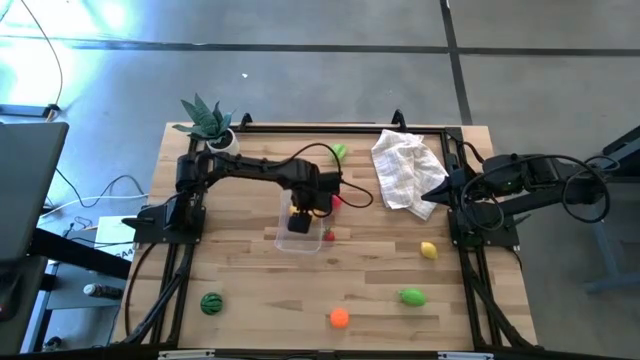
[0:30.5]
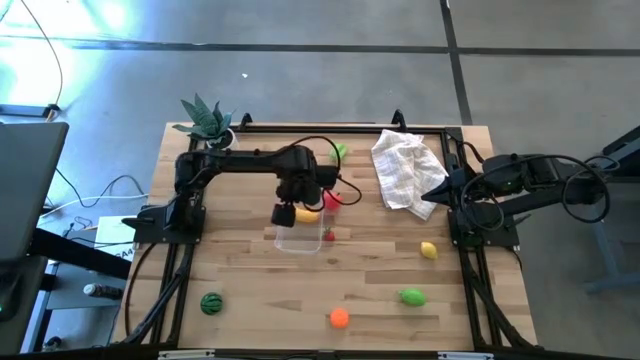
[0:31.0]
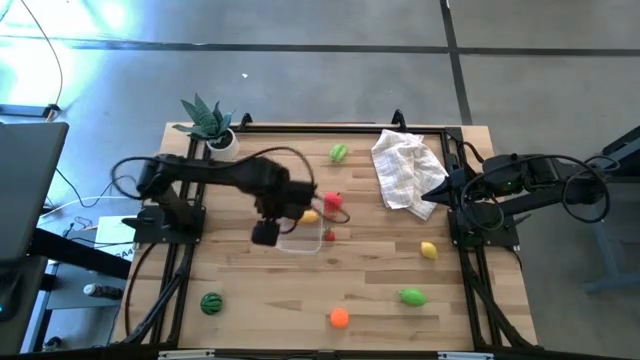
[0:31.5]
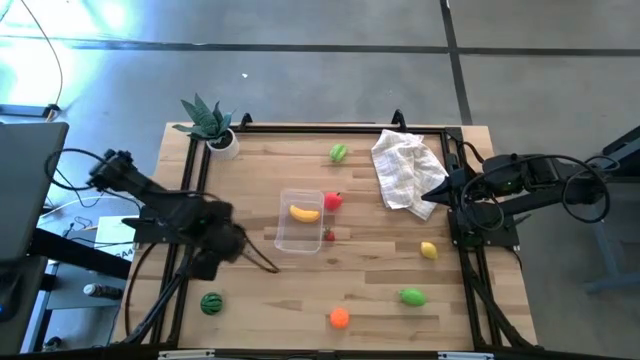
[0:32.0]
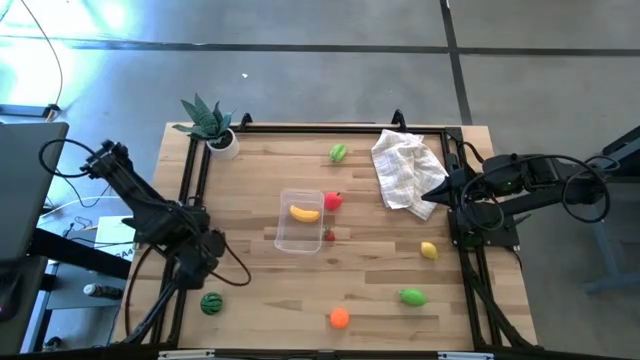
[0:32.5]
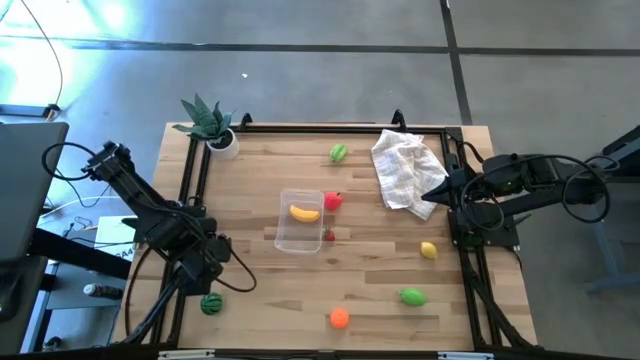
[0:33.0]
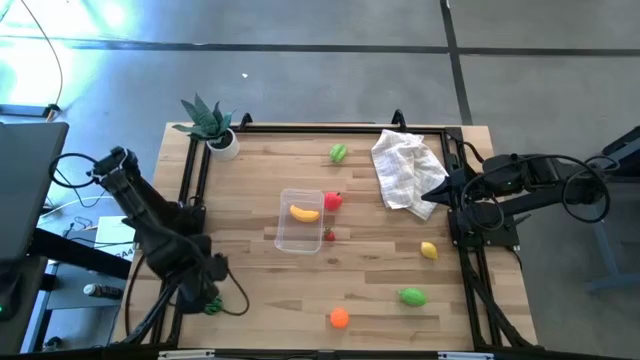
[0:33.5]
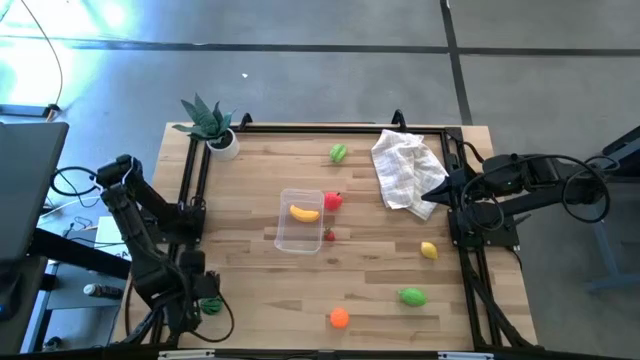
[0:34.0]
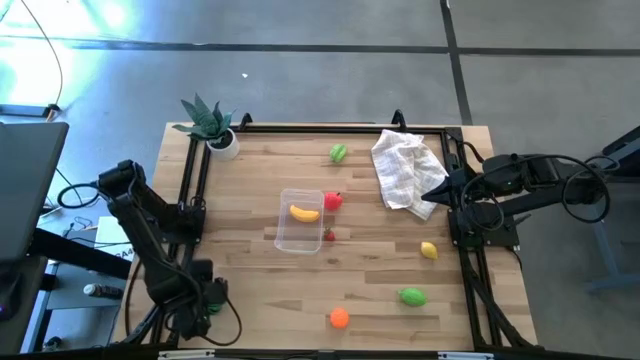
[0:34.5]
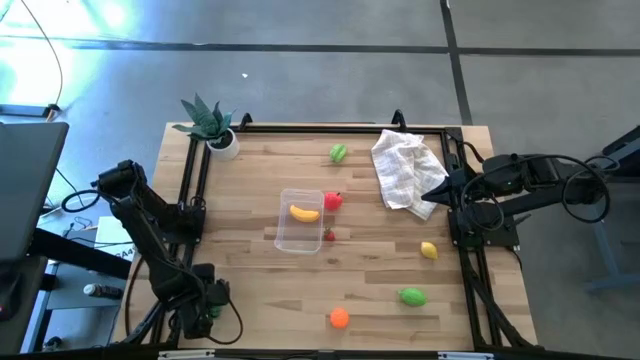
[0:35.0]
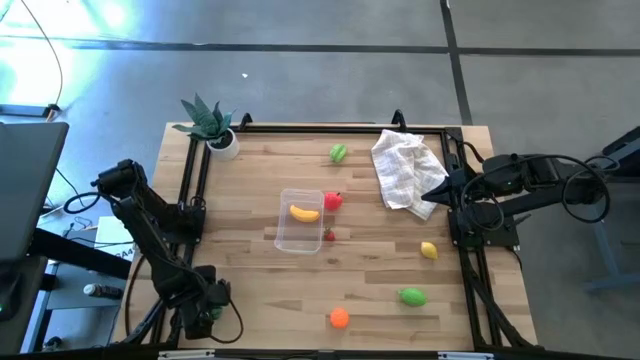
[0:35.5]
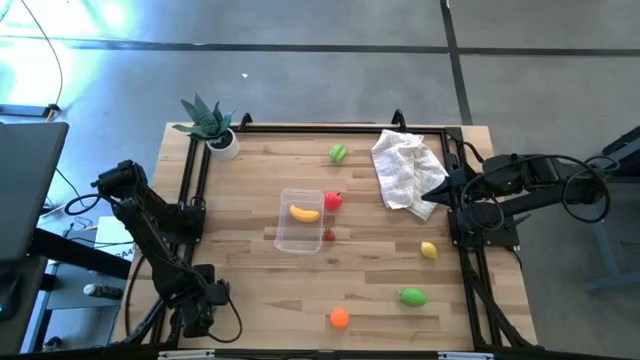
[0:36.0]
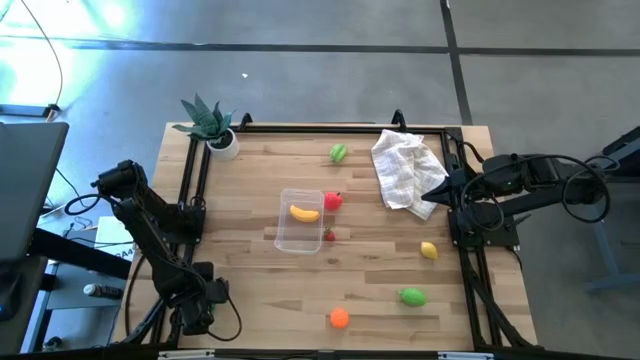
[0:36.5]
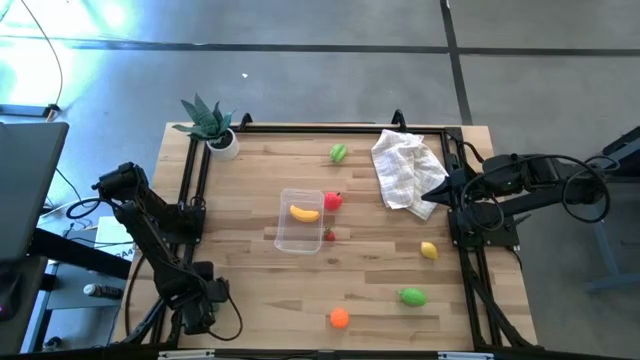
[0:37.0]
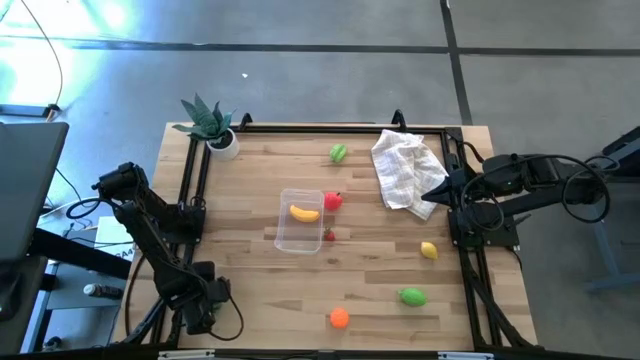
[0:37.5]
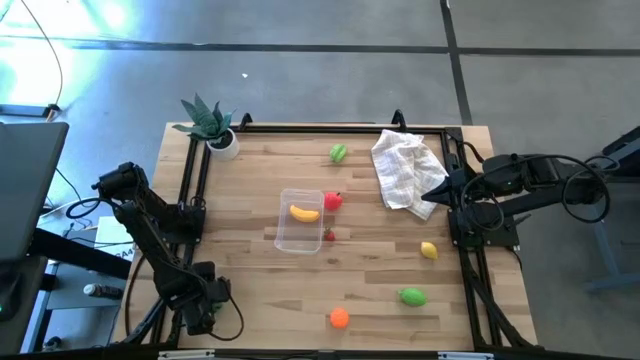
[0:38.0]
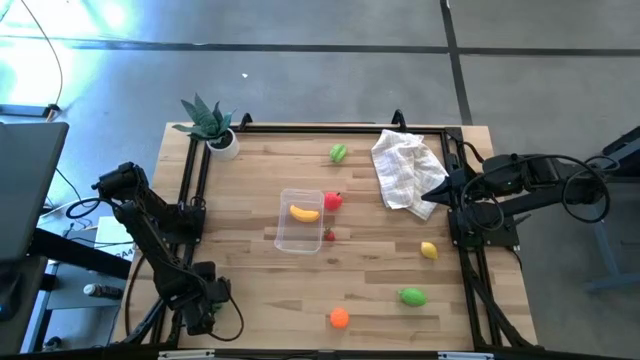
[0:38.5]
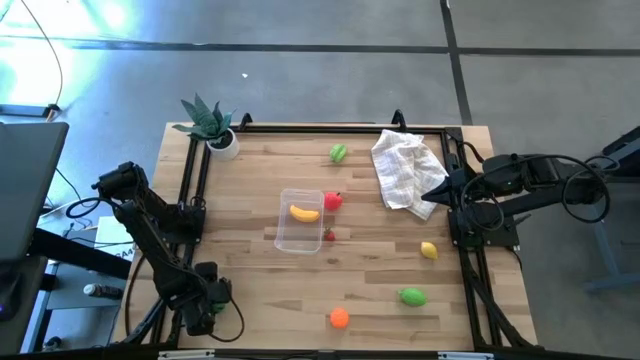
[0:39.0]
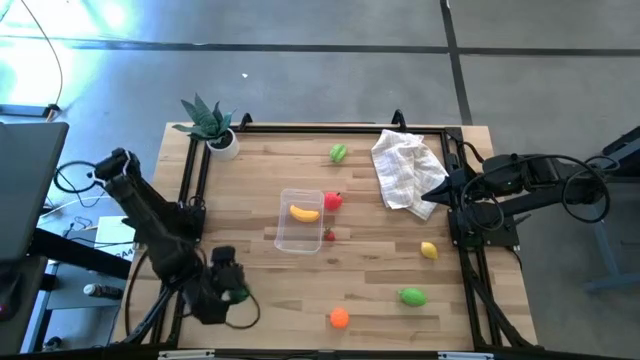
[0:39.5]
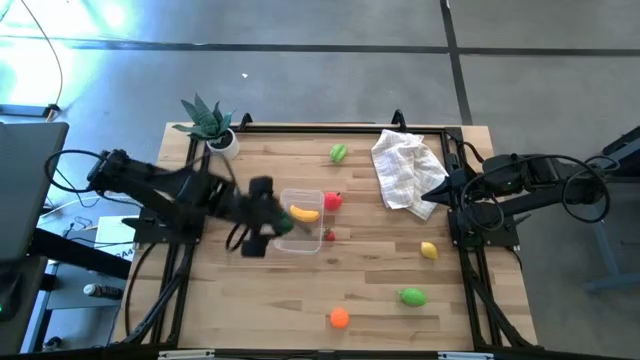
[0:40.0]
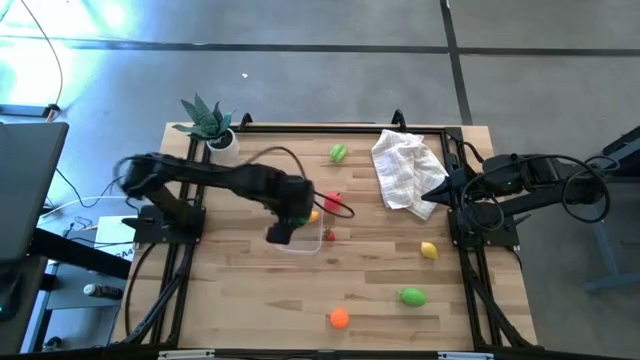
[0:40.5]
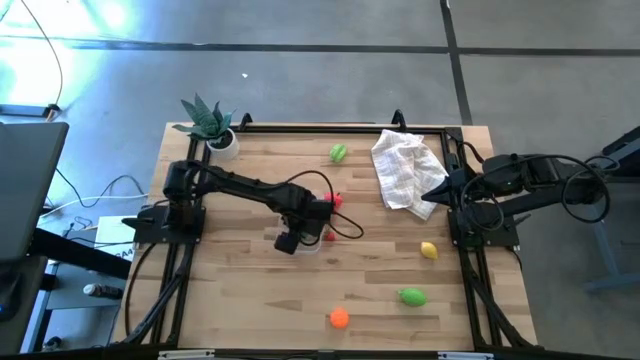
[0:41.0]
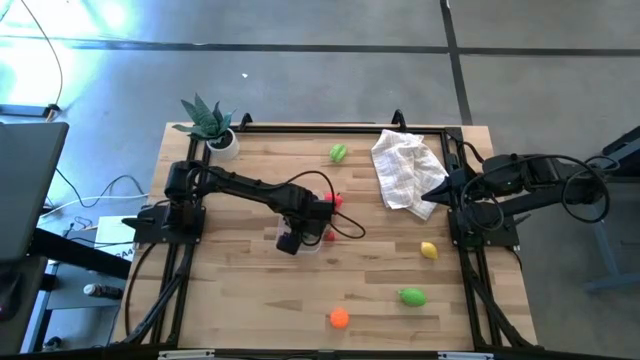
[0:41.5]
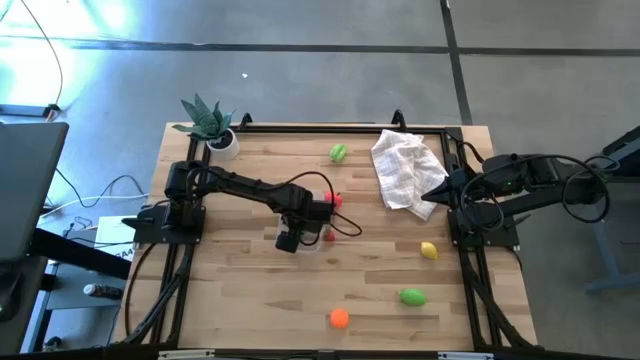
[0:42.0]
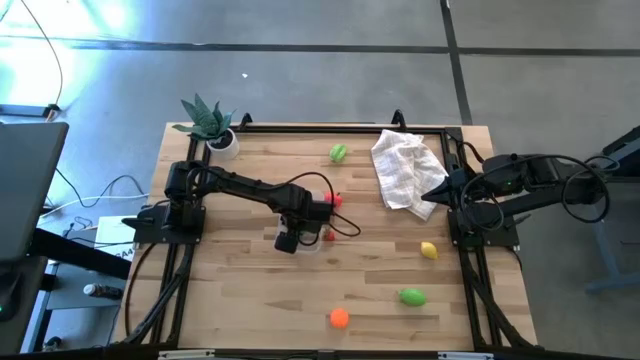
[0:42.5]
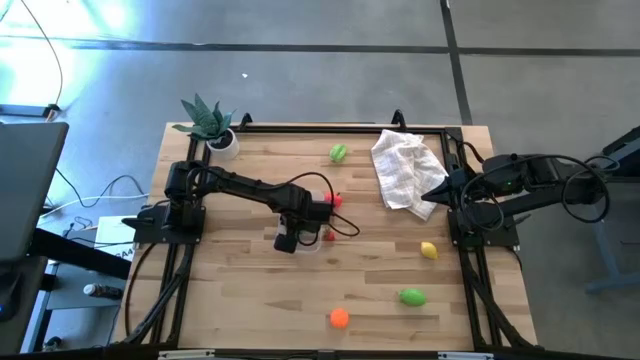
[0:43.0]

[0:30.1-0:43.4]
Task: Pick and placing Produce into tupperware
Put the watermelon into the bin

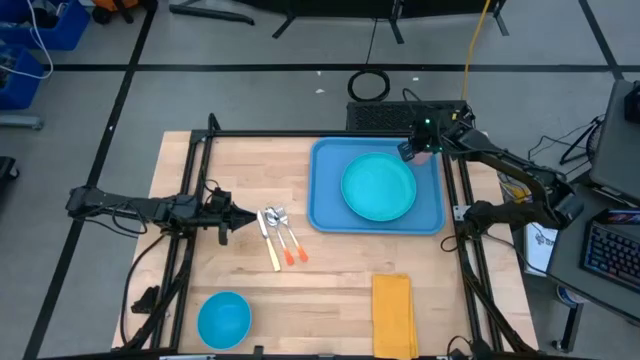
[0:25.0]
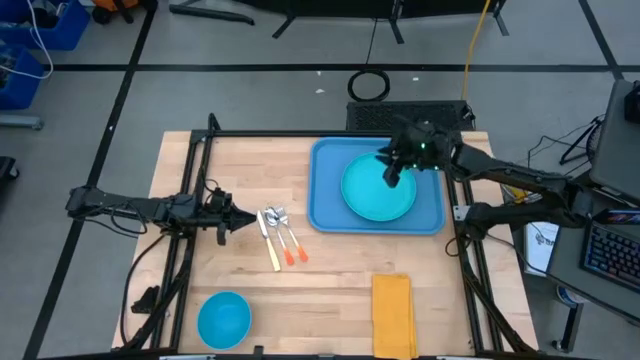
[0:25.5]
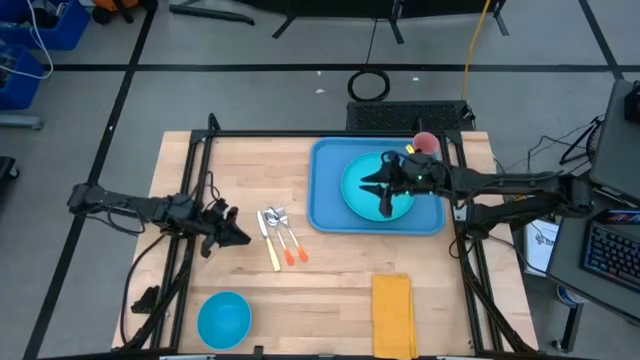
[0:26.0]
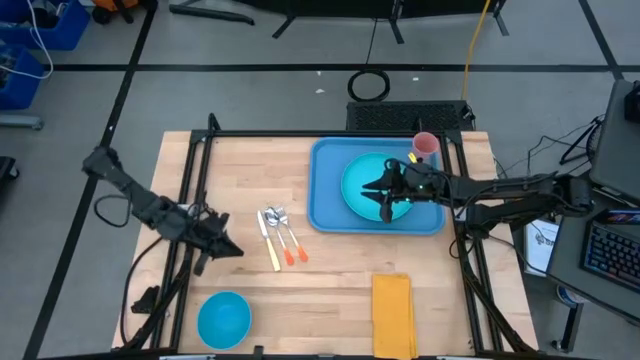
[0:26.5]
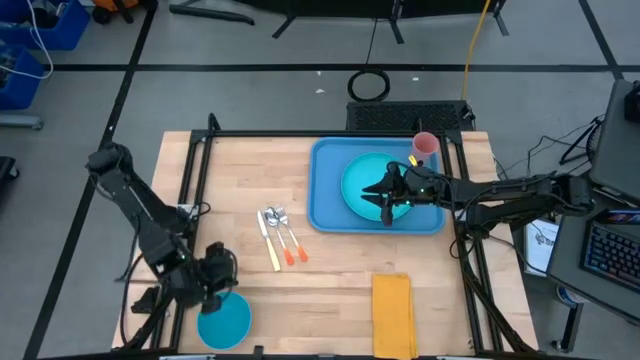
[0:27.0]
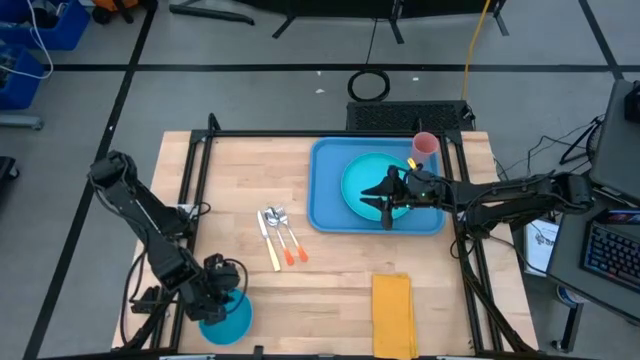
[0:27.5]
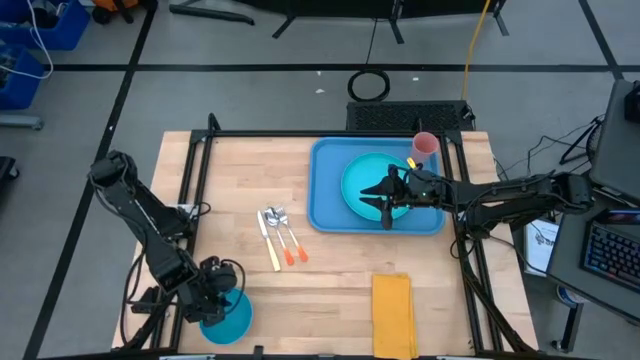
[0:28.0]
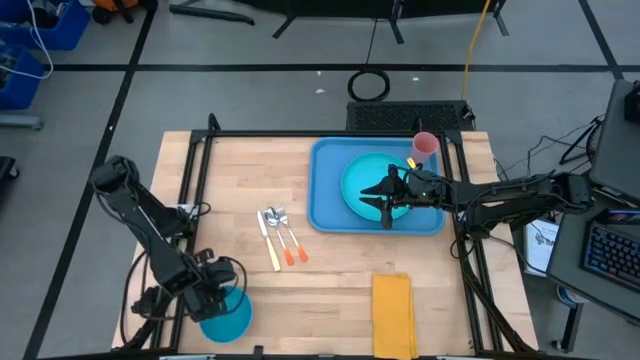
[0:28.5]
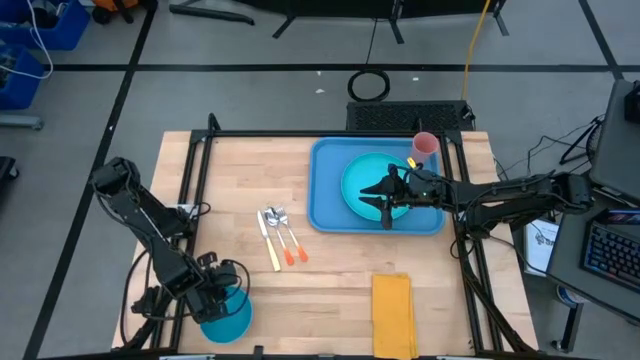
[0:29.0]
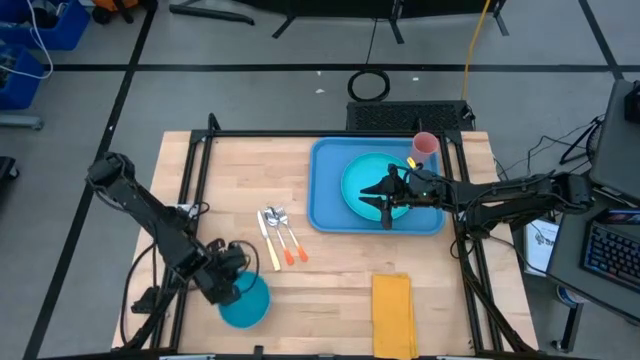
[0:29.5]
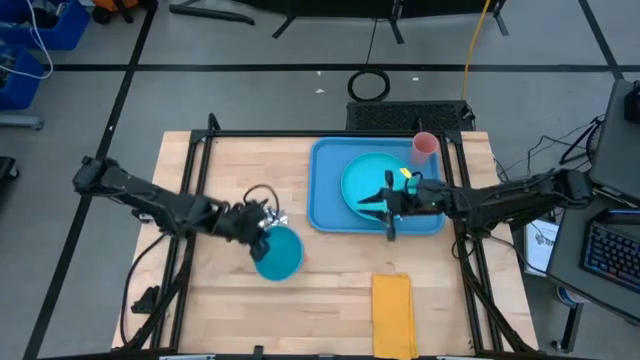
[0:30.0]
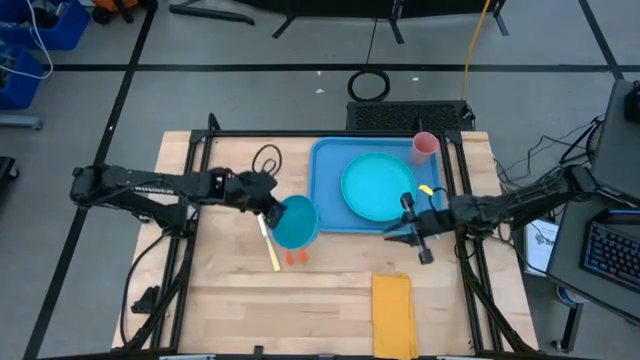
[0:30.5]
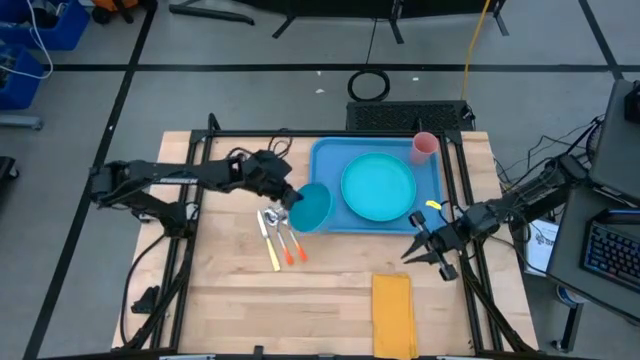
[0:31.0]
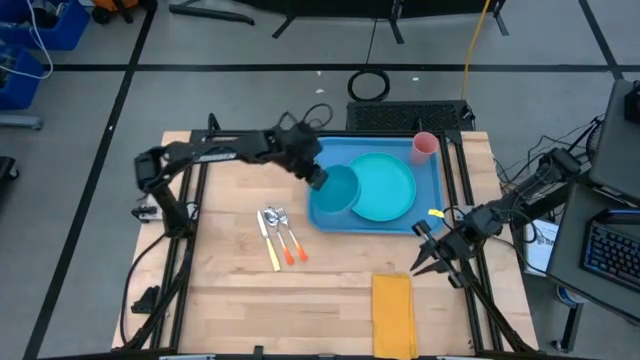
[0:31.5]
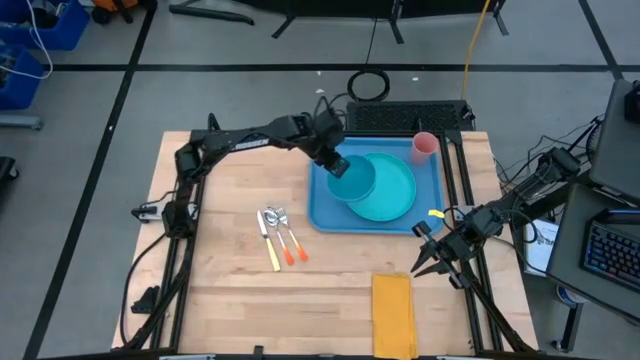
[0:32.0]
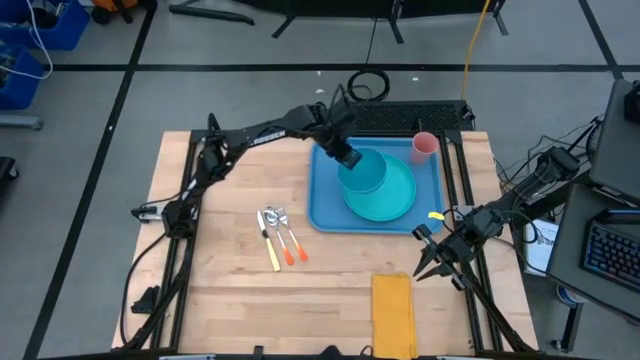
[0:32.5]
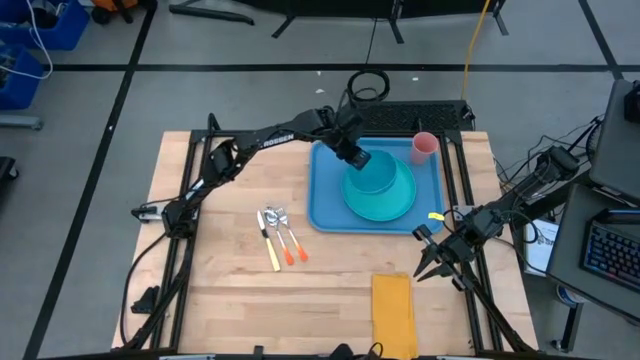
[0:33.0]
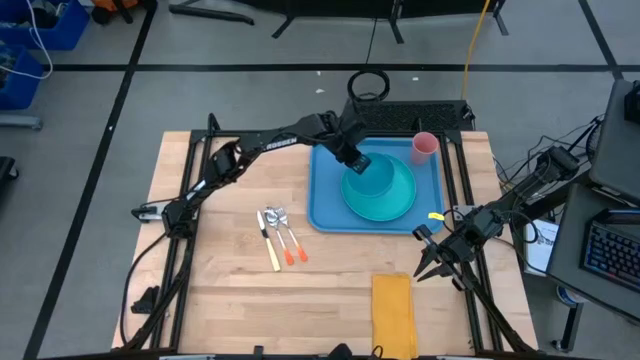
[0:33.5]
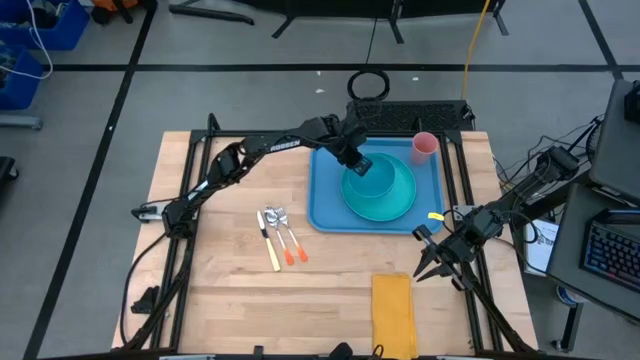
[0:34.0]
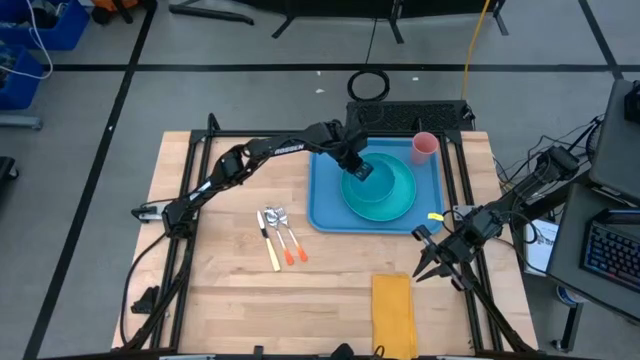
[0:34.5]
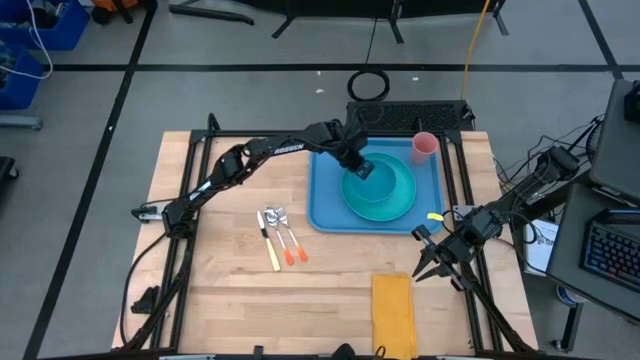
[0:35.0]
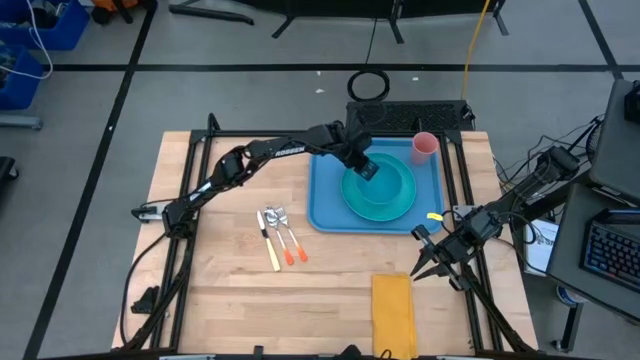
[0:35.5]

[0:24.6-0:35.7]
Task: Set up tray
Put the blue bowl onto the blue tray
